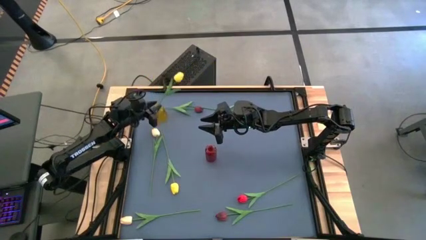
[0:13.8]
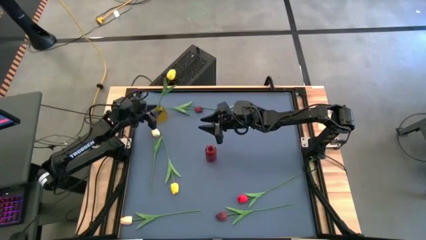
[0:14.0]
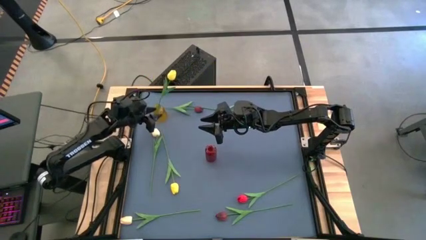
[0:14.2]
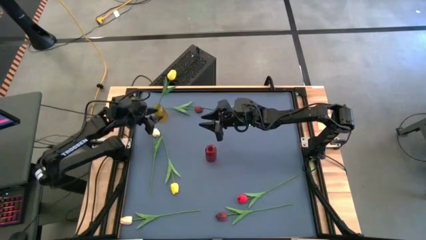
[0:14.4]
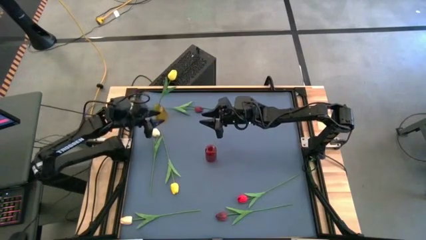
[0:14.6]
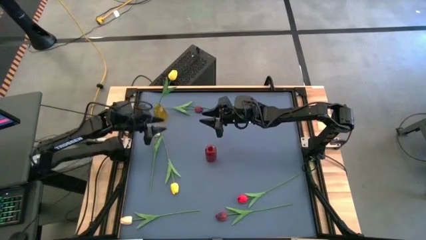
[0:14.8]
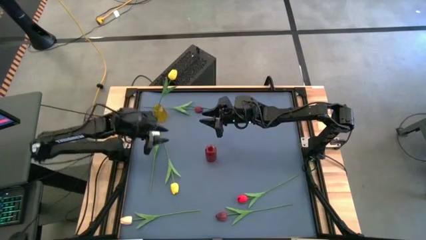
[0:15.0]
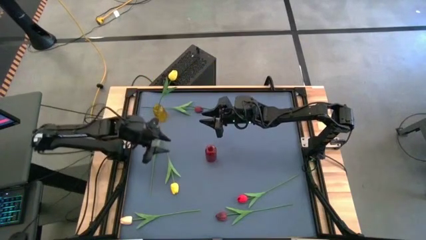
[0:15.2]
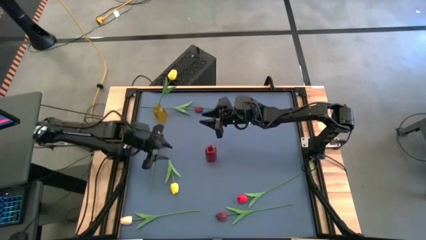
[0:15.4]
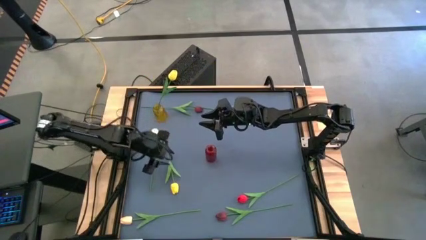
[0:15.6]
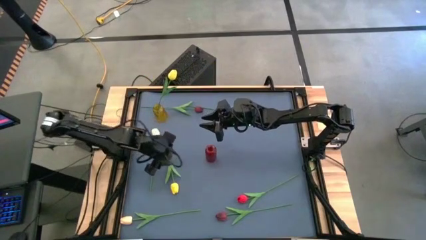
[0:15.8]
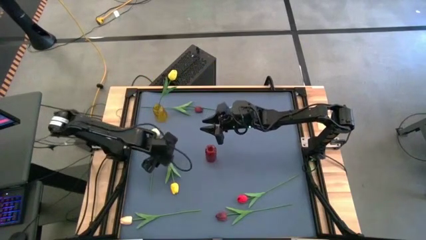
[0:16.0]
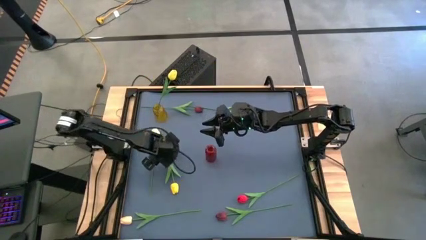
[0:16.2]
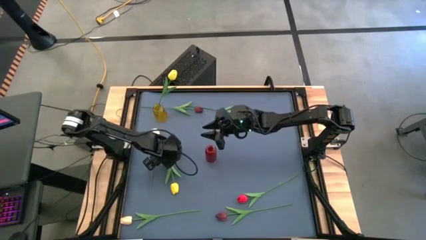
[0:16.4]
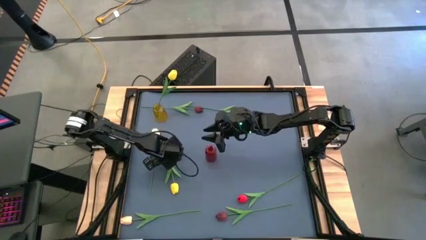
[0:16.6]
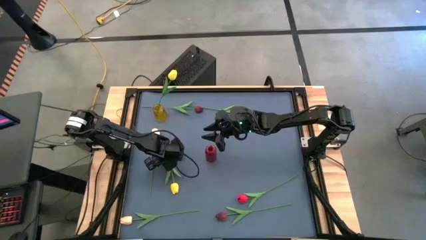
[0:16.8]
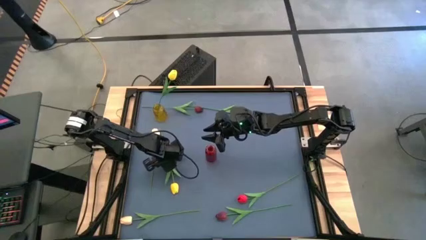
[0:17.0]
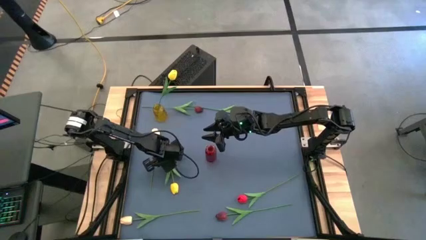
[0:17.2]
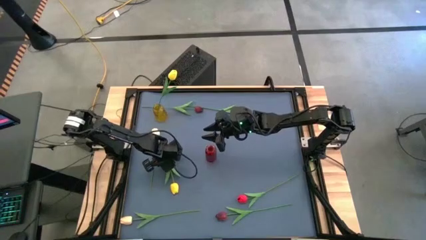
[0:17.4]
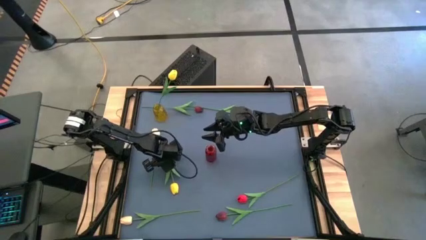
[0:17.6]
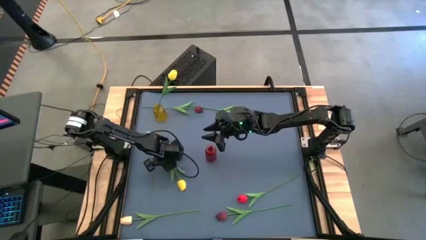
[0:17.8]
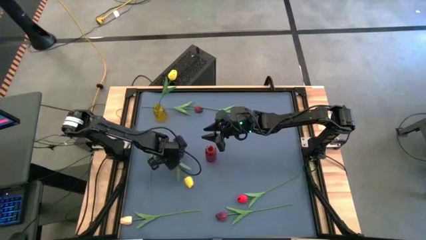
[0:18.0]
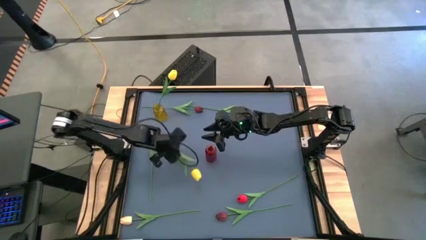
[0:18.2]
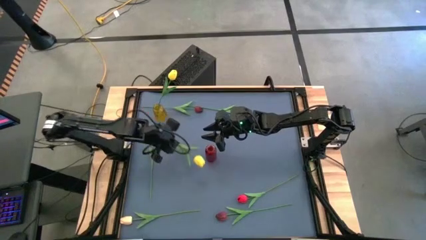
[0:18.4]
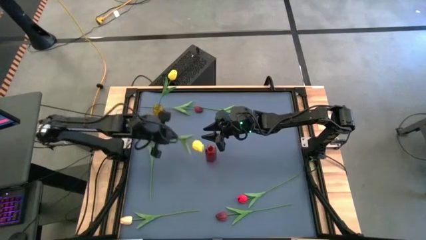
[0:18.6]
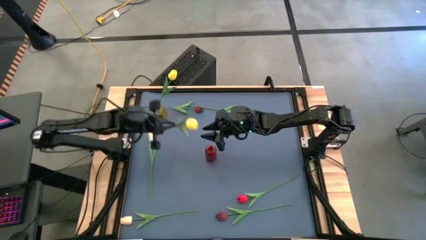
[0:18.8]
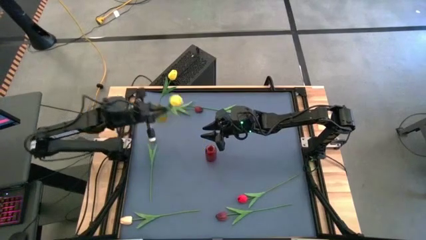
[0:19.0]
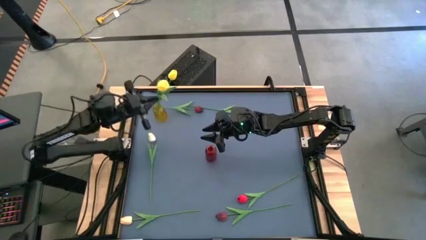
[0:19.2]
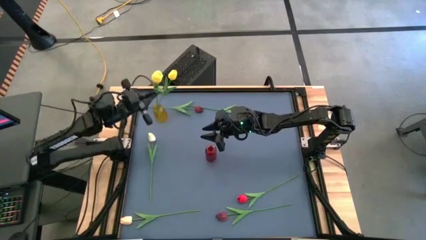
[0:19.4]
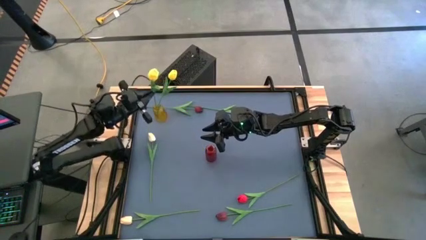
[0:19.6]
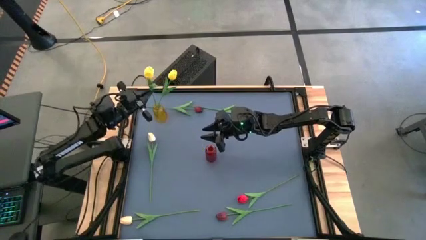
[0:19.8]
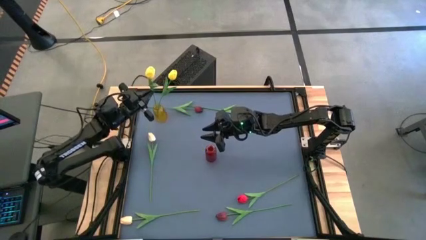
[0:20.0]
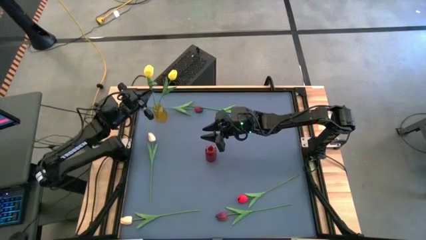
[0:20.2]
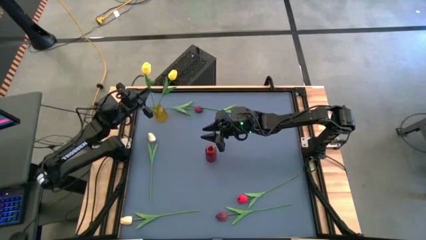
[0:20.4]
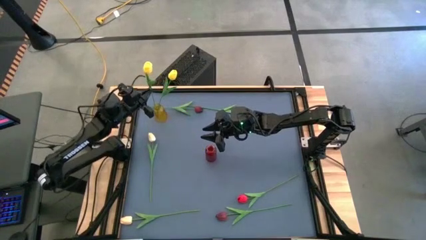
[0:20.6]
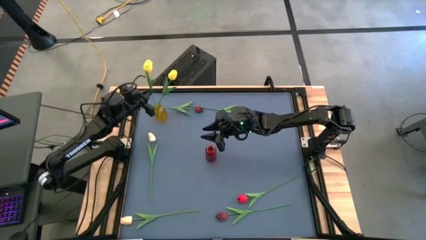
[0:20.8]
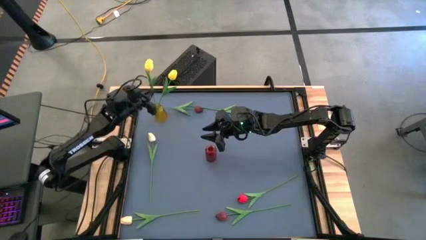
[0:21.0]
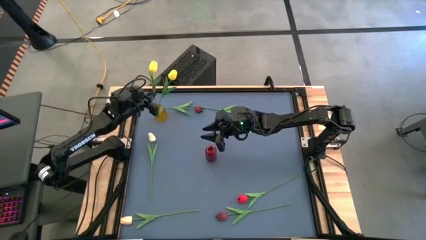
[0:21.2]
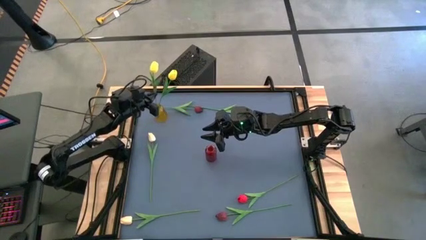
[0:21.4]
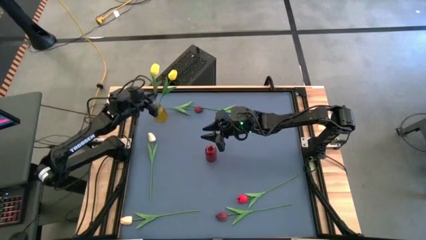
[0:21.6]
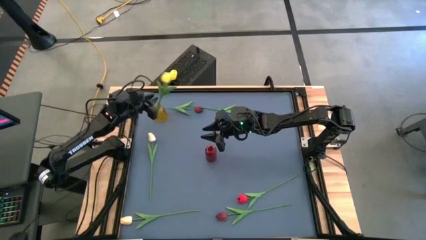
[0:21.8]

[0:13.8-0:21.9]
Task: Sort flowers into vase by color
Put the yellow flower into the yellow vase

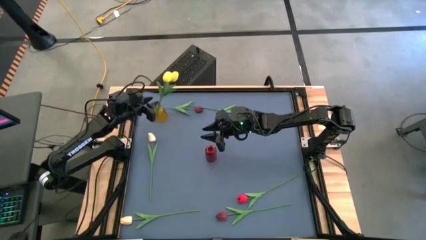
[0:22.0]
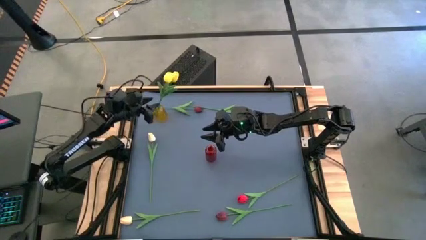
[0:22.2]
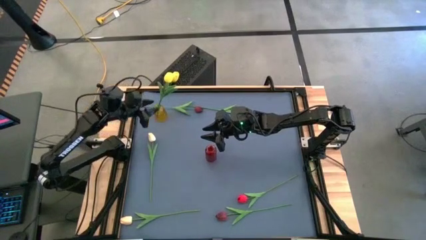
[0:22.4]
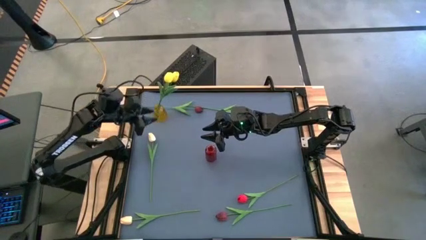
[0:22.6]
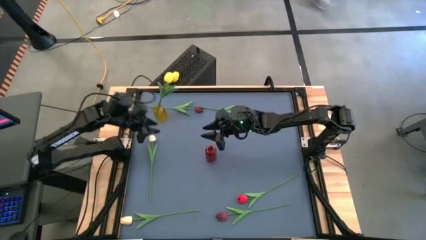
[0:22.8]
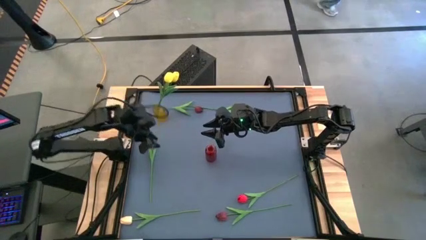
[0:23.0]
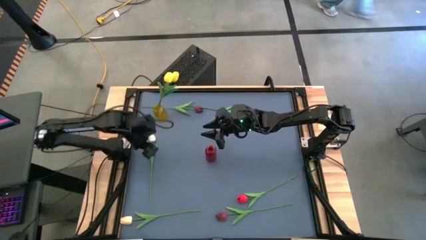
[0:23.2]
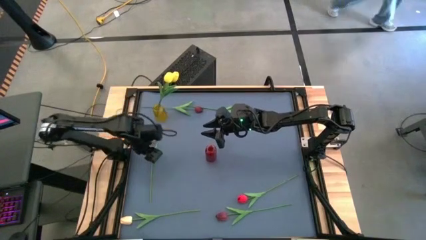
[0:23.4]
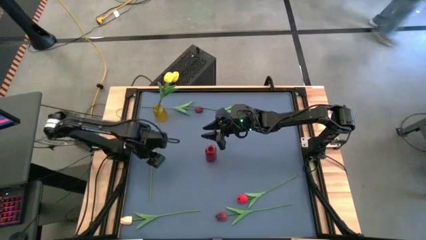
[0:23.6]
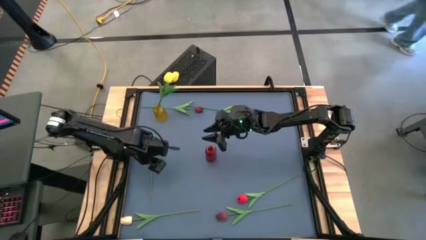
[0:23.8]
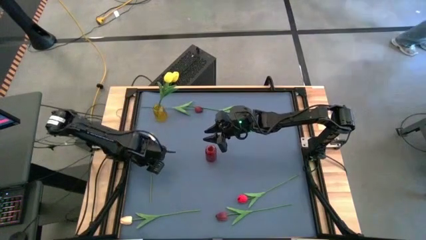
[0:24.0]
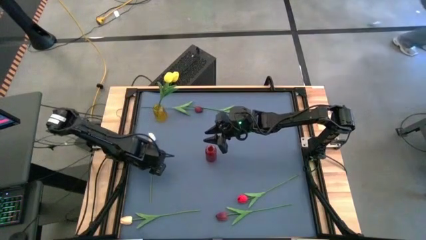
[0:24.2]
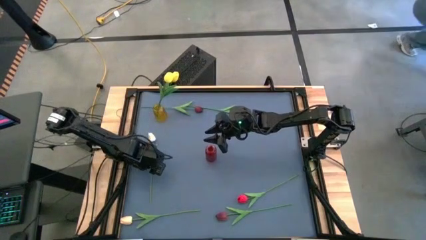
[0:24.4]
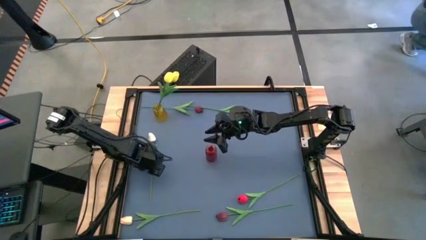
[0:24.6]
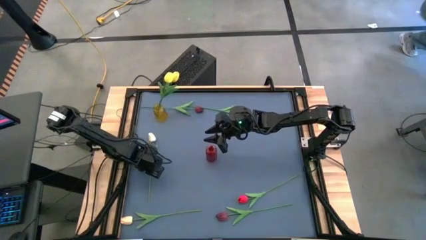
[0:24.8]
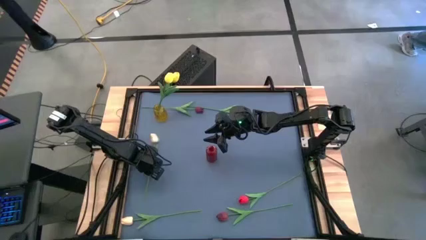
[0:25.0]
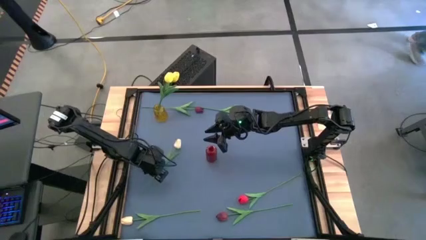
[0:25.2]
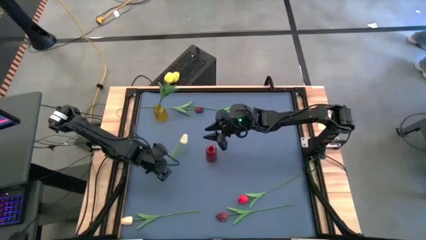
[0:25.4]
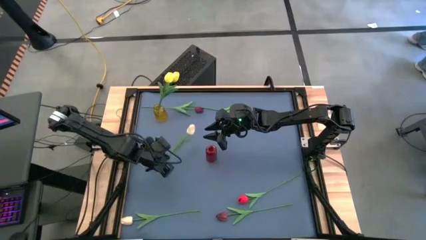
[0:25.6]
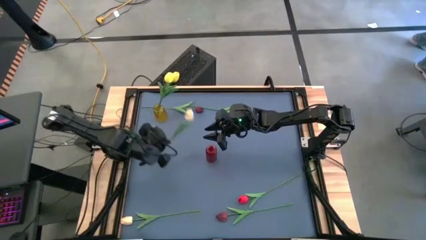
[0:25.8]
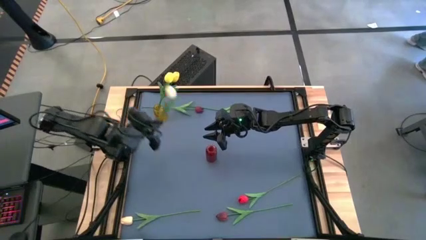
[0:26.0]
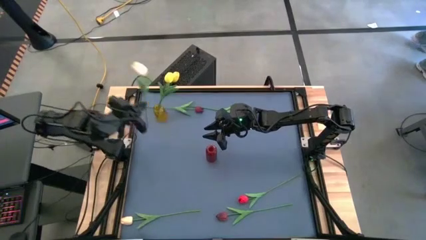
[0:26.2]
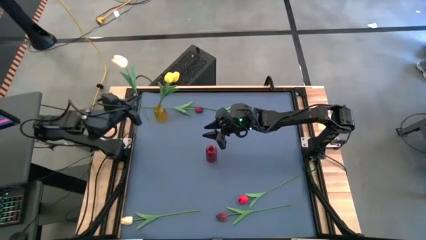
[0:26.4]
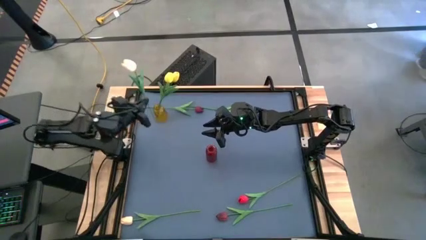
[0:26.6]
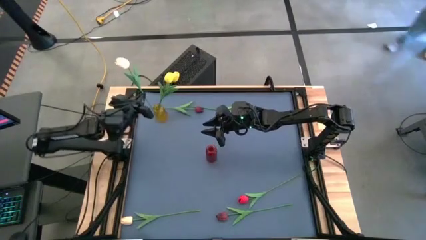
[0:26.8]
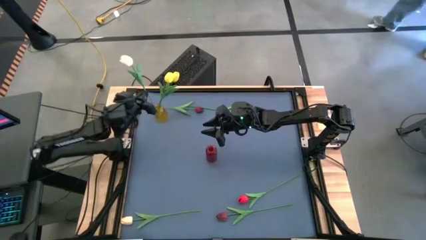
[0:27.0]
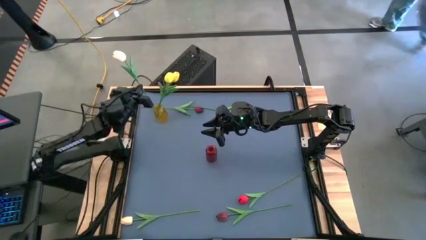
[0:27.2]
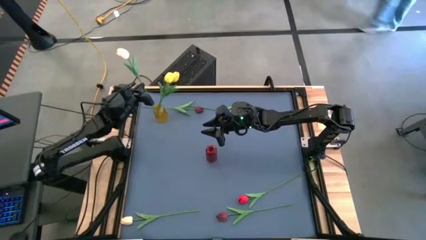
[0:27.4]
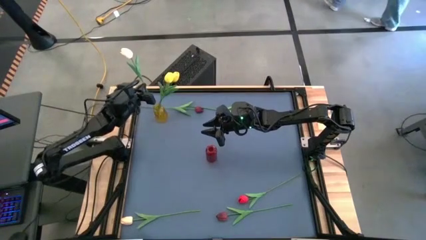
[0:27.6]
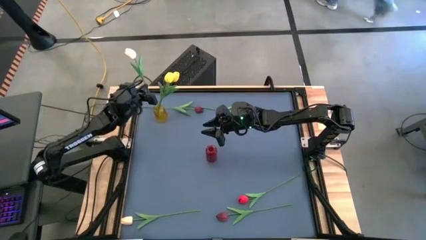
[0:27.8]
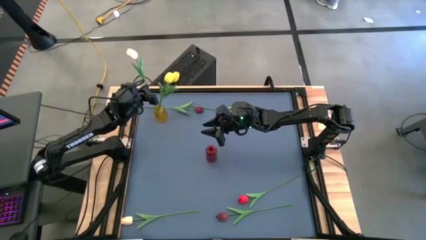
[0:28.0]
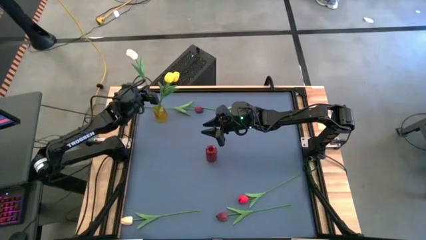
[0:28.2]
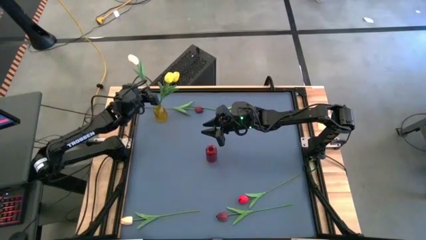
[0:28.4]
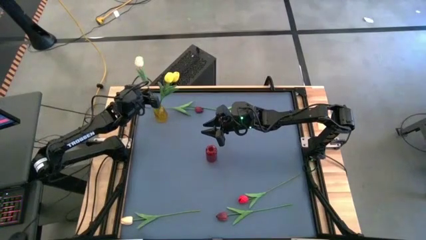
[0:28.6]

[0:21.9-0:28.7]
Put the top white flower into the yellow vase

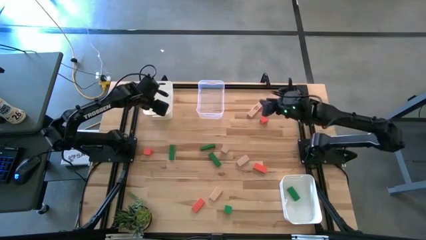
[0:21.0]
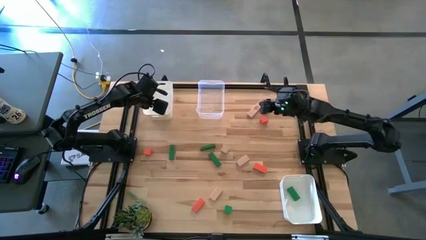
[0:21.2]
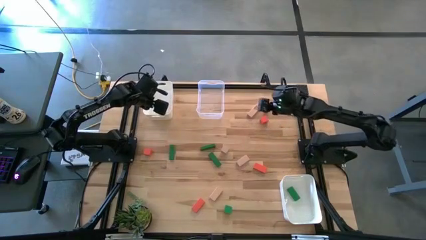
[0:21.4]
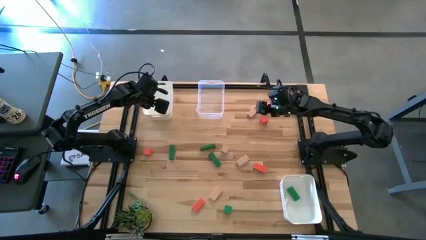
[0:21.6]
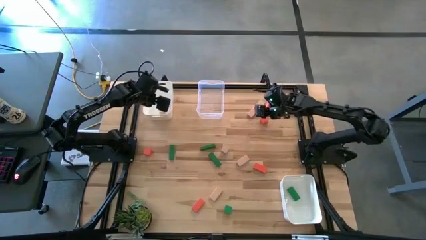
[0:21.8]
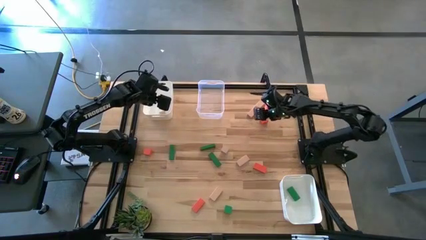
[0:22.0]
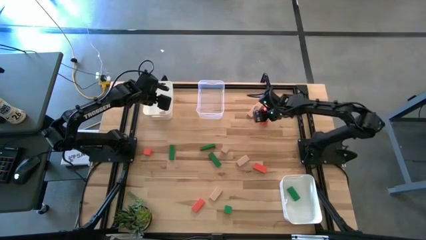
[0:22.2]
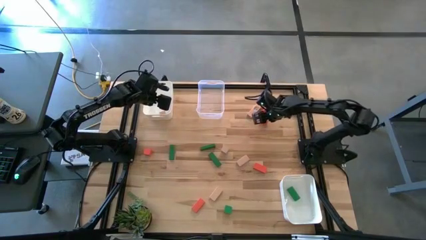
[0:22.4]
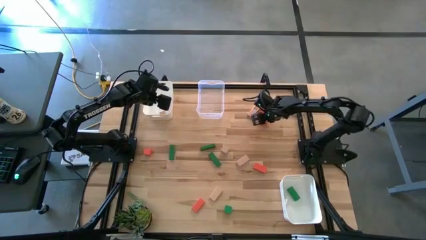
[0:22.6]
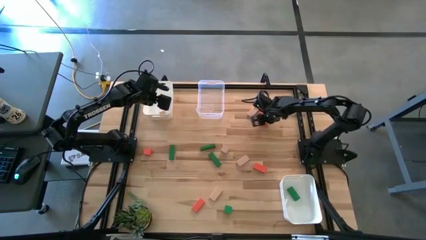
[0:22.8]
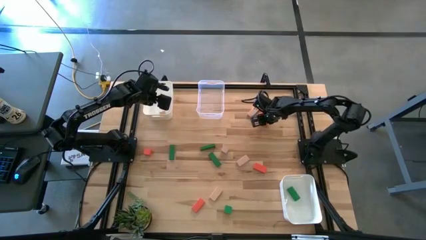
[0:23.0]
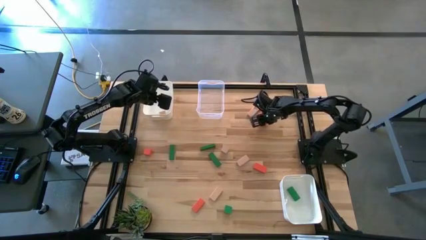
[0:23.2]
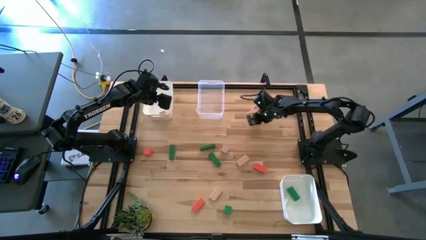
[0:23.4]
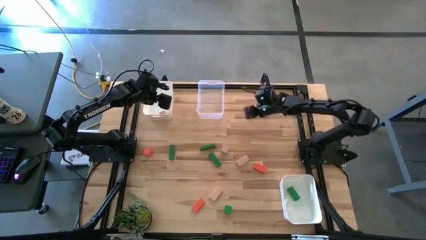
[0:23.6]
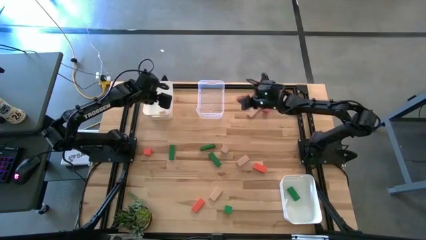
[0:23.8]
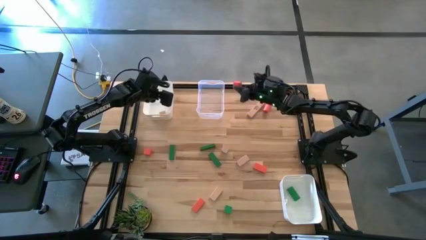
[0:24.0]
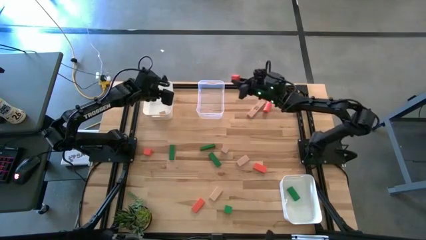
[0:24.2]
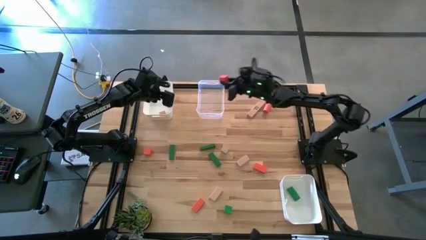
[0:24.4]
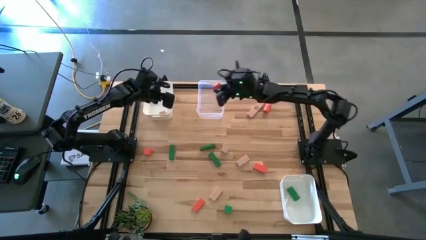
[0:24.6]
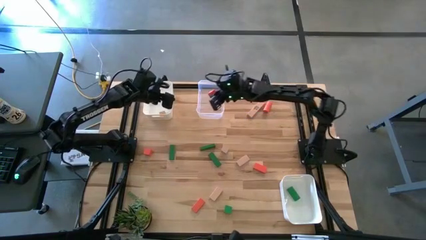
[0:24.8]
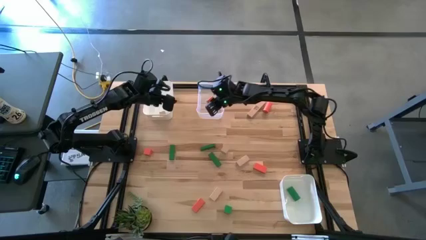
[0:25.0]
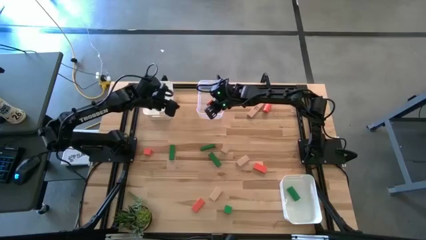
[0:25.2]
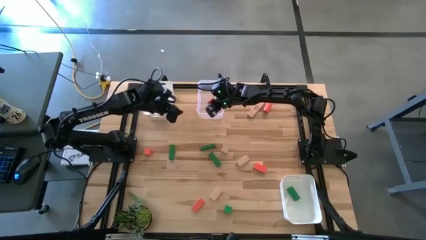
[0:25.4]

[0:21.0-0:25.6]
Task: Sort & place blocks by color
Put the orange block into the transparent bin
